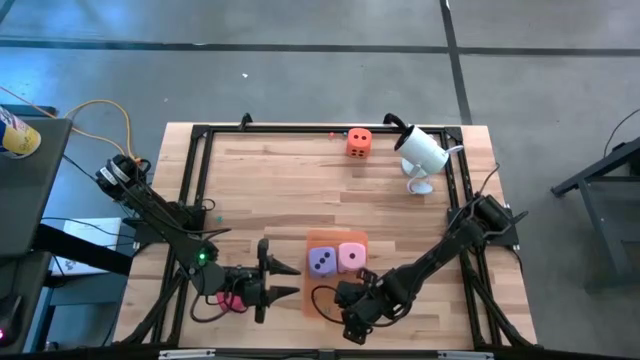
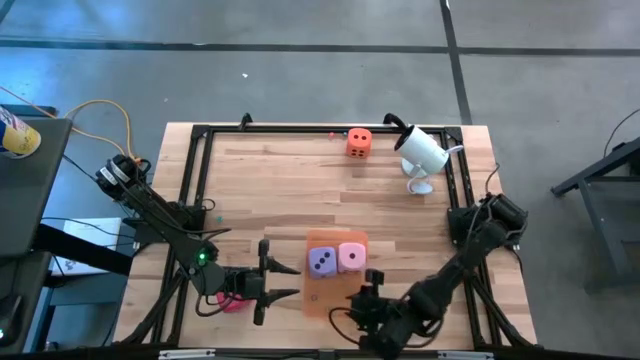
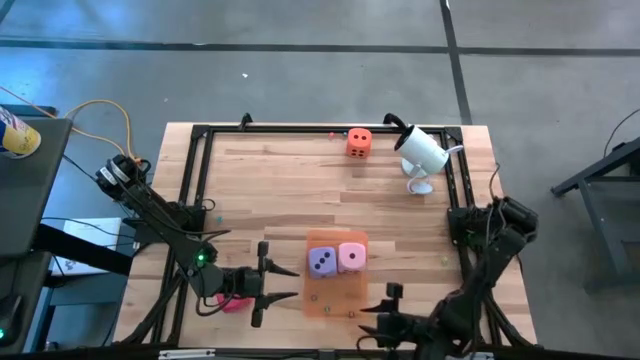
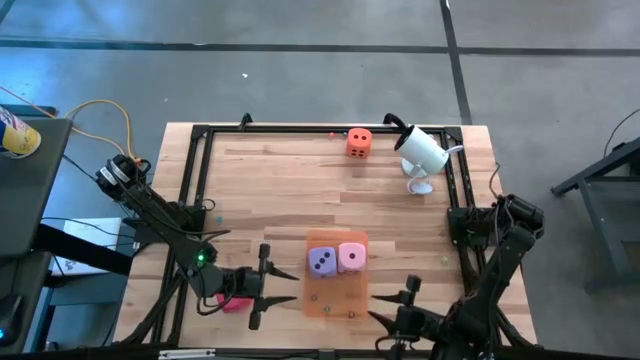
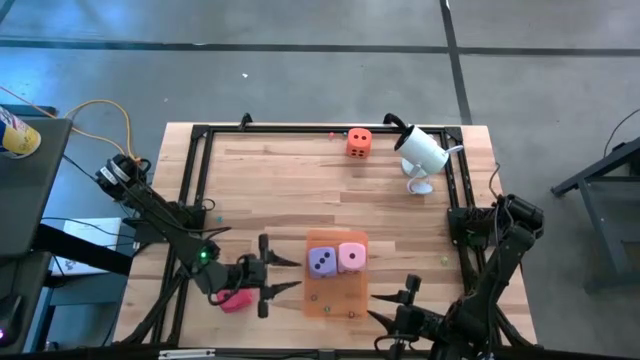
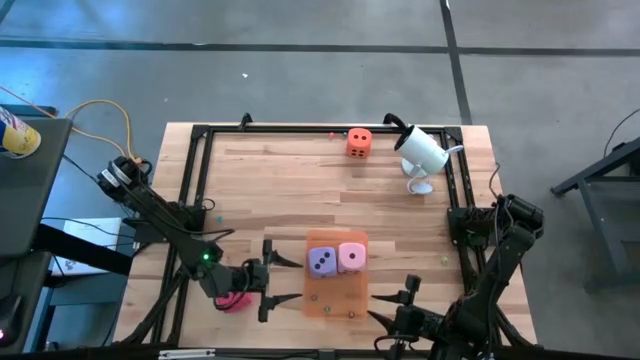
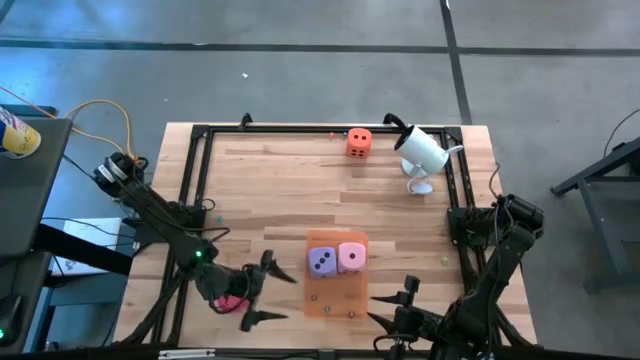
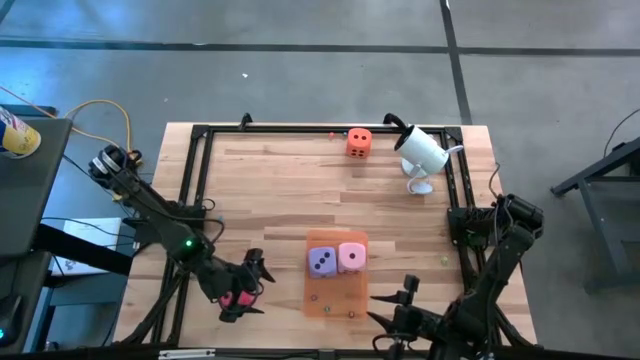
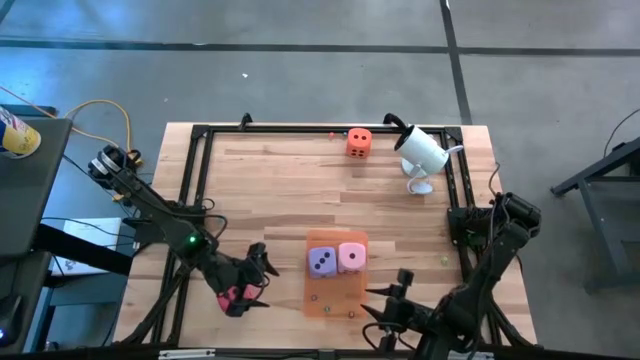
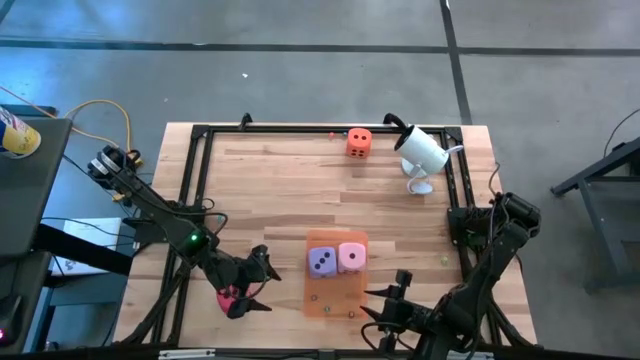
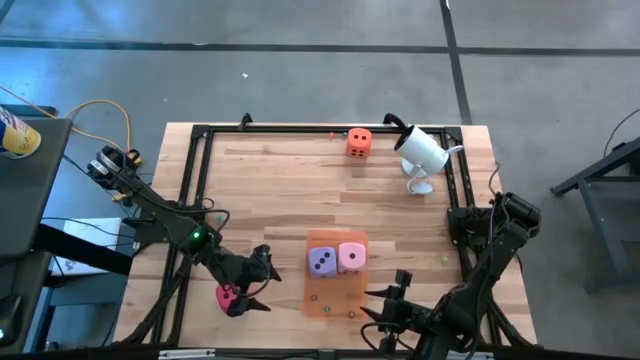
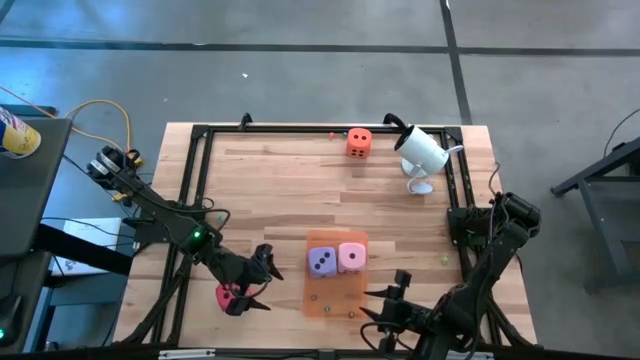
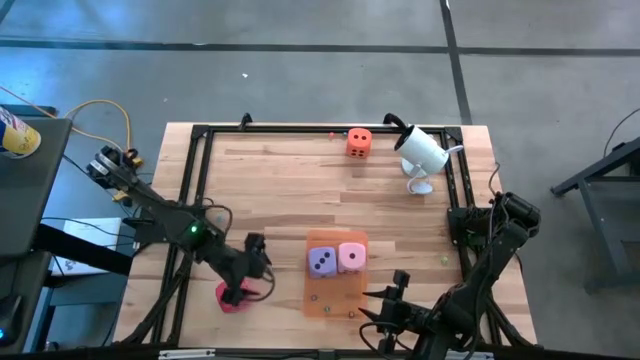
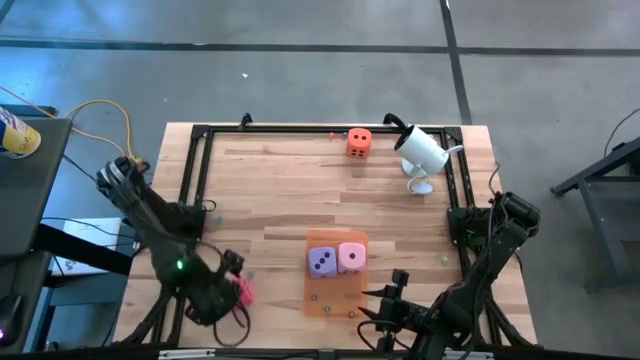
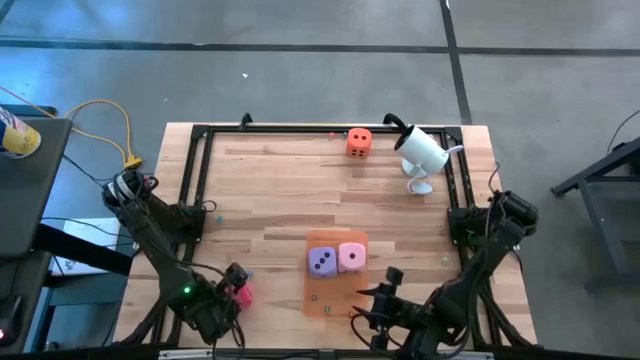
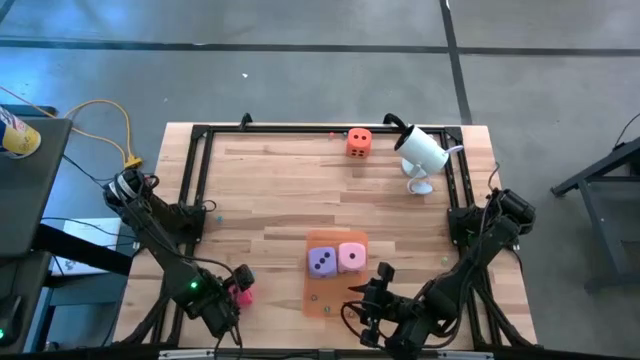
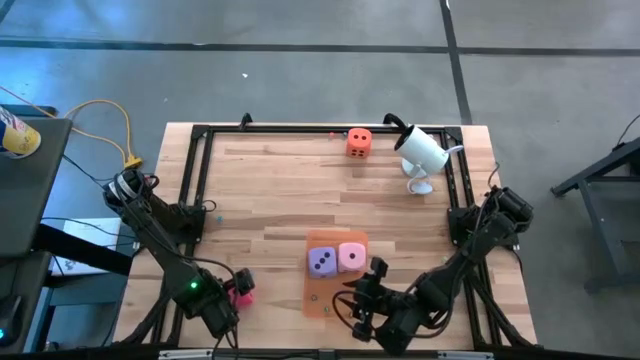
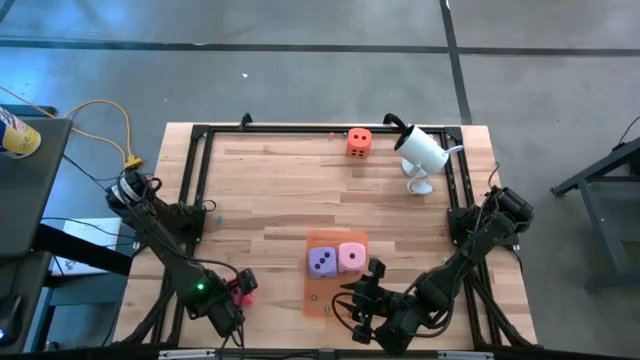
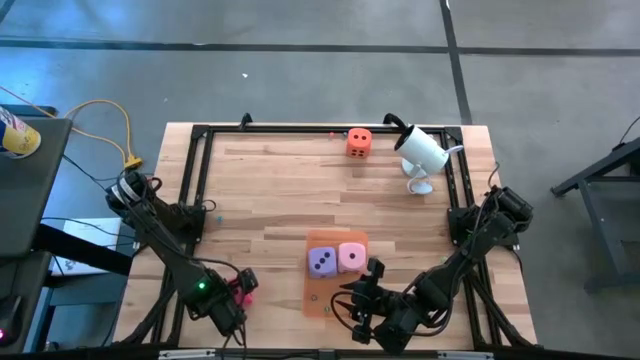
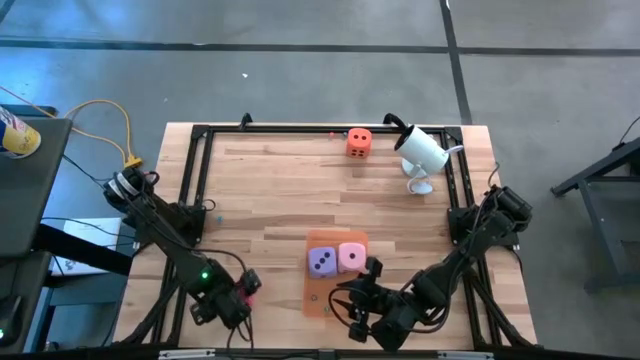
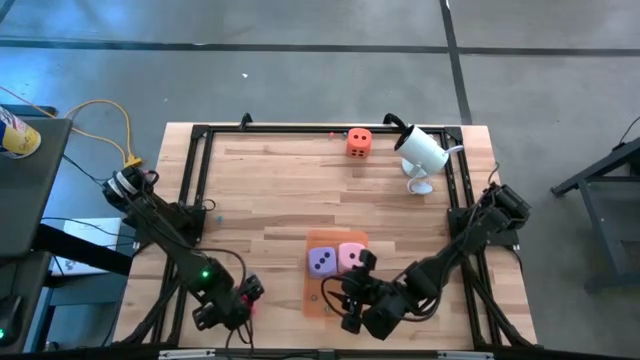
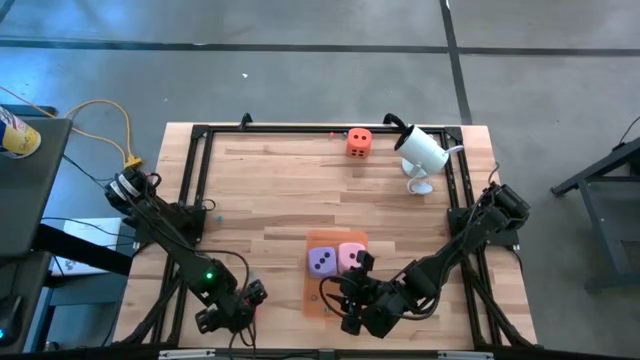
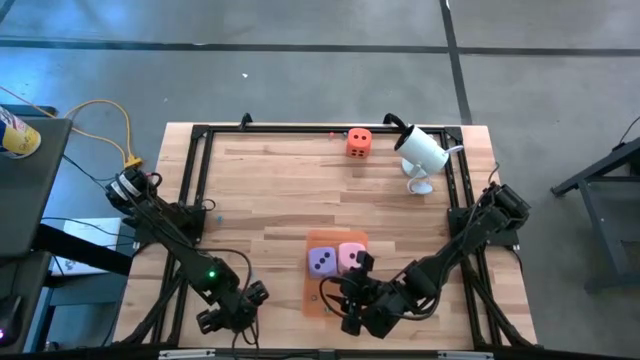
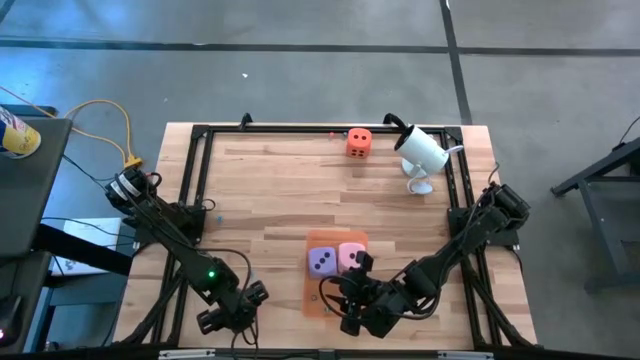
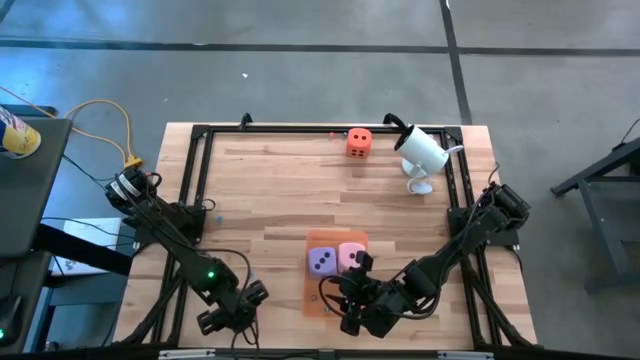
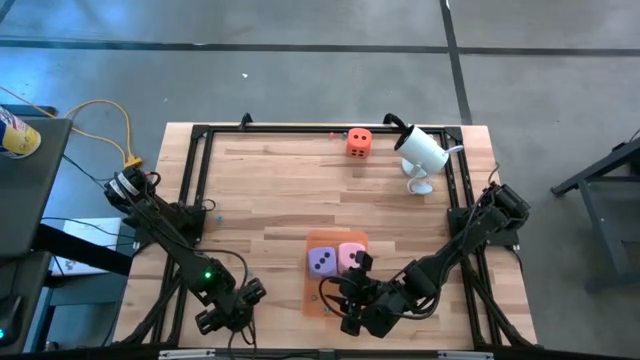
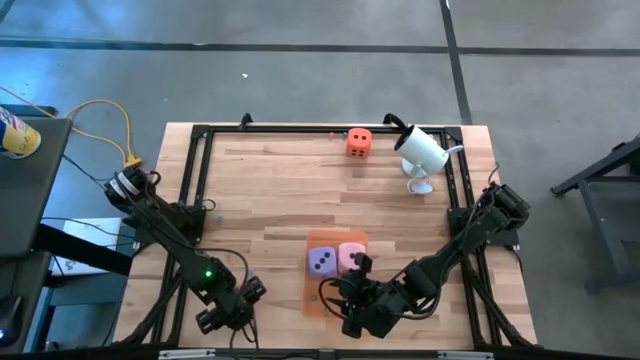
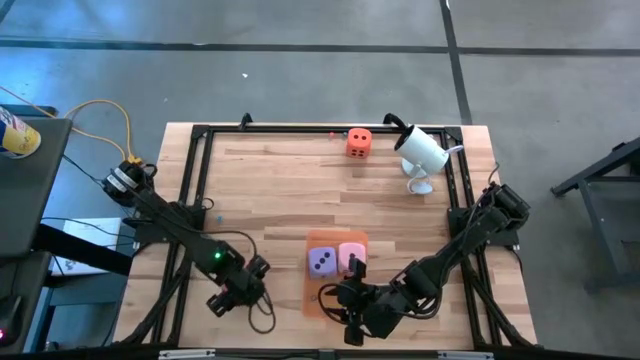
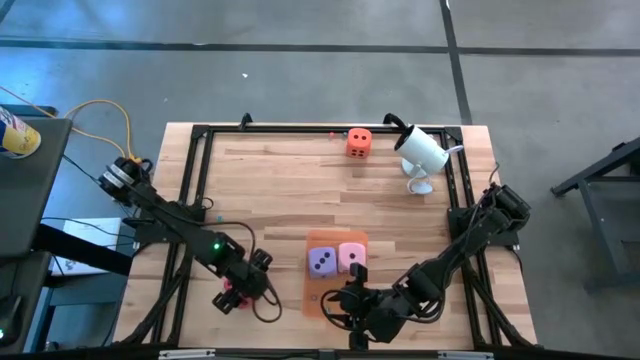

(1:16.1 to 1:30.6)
Task: Pick & Place Dice
Put the large red dice into the orange bin

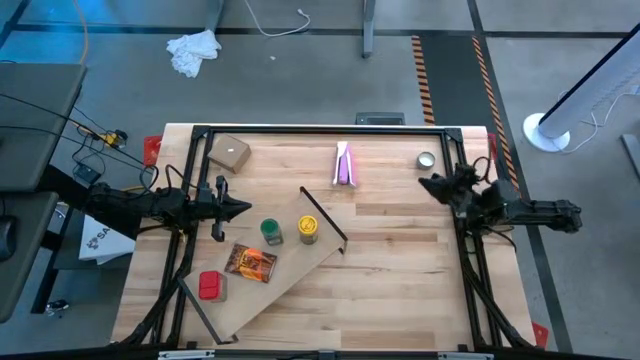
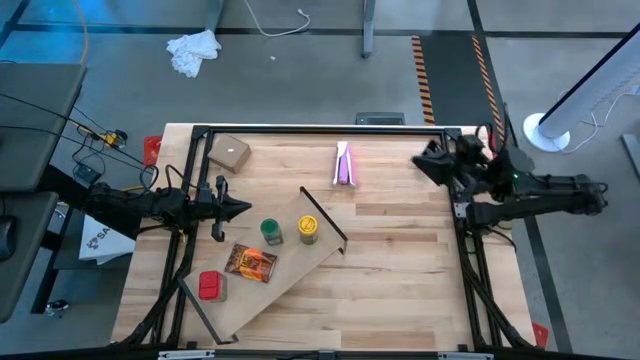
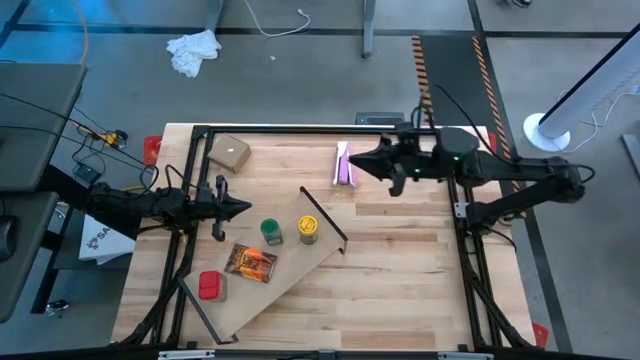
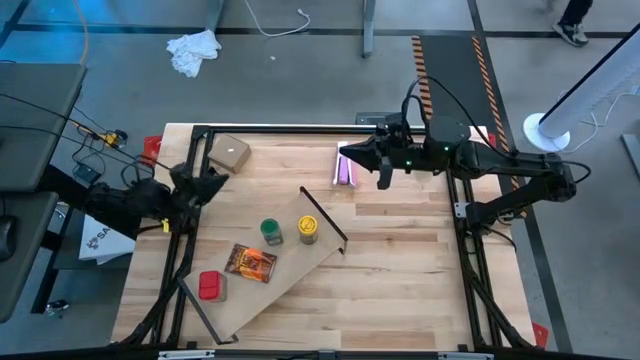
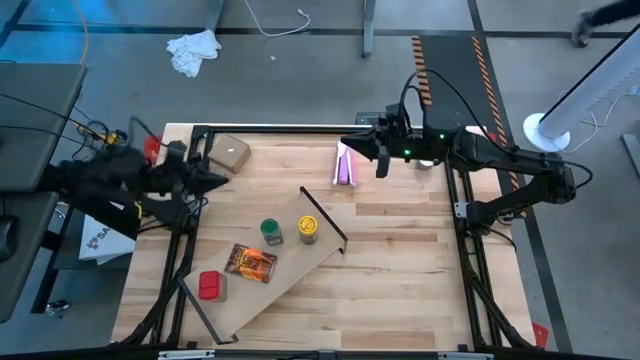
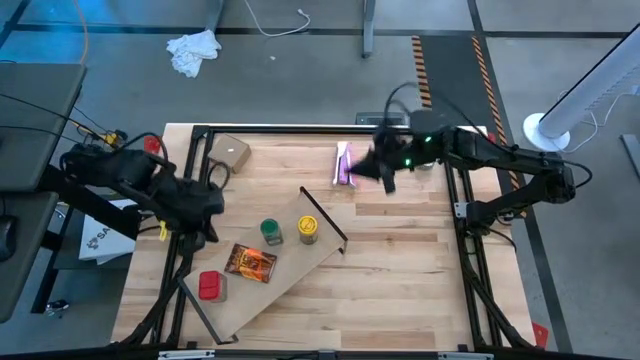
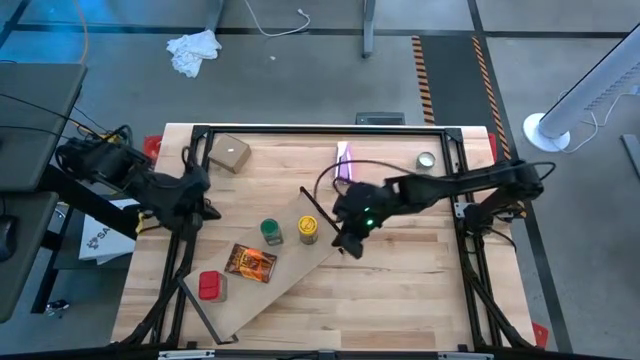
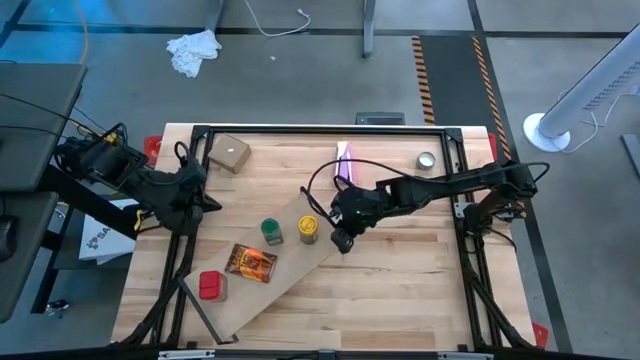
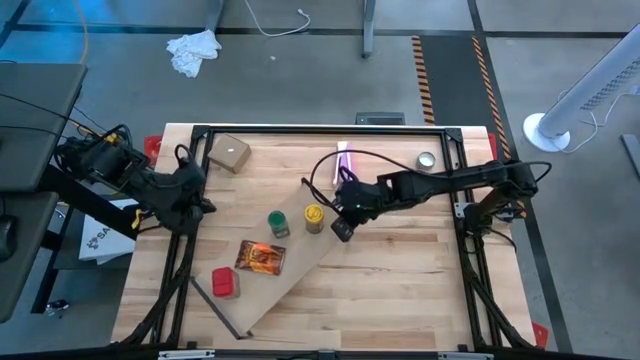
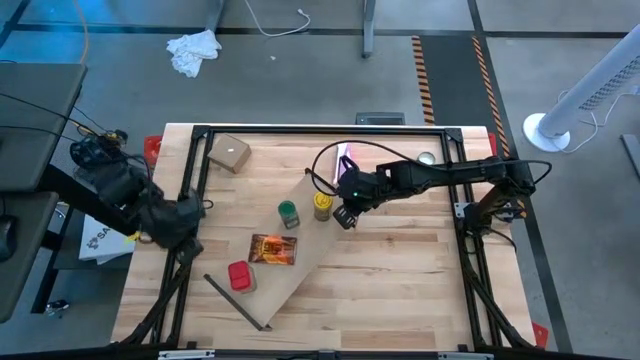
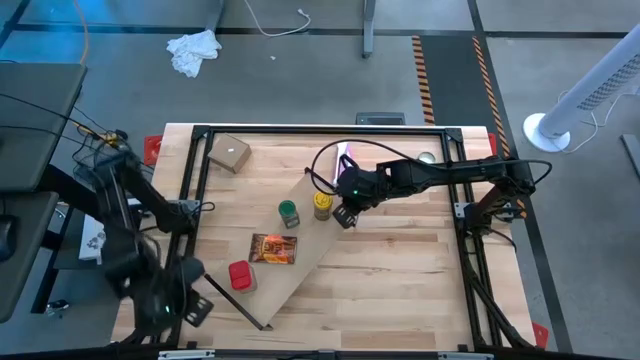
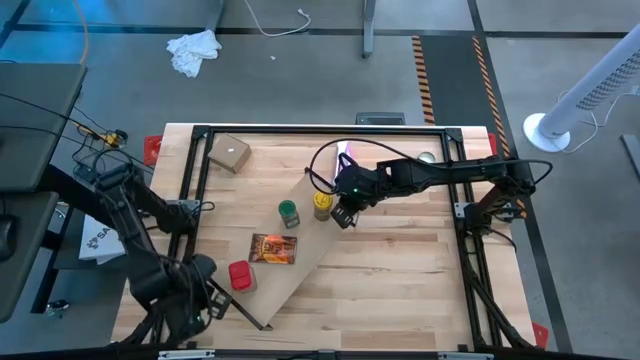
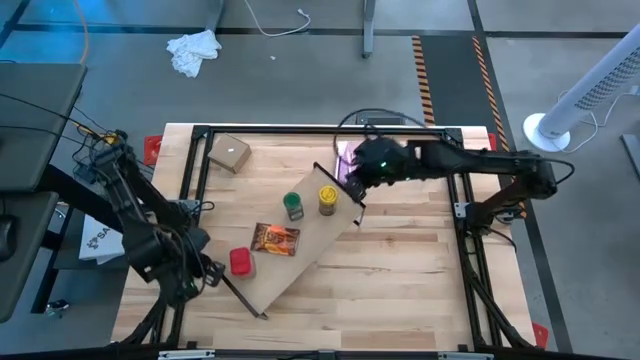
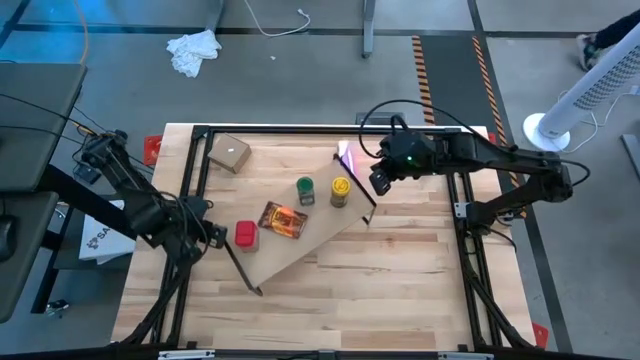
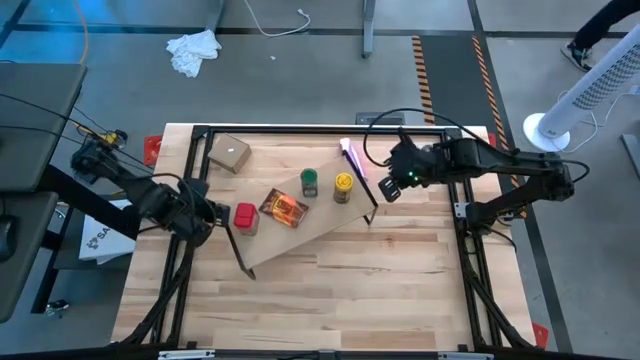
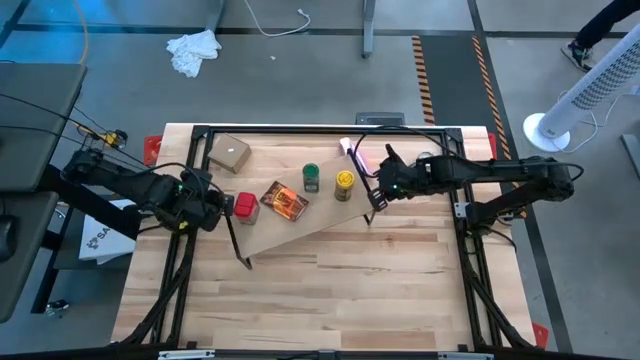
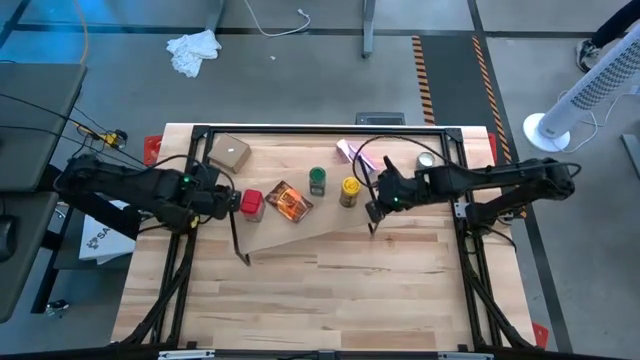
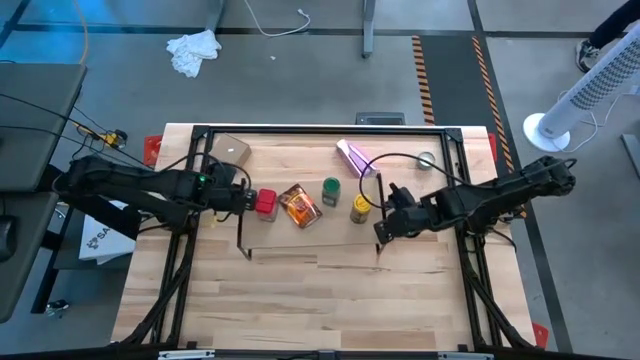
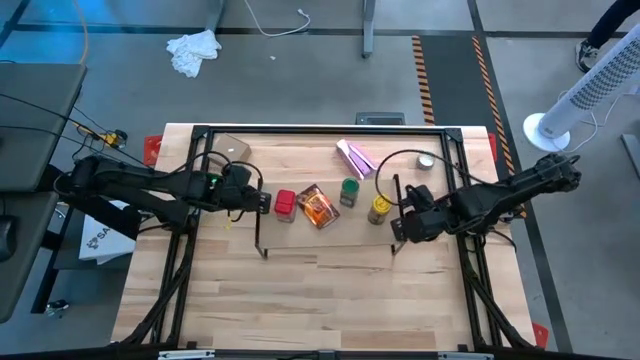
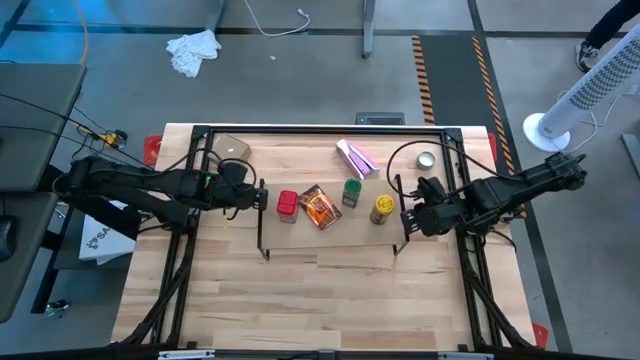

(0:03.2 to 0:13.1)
Task: Shelf spices
Move the shelf to the middle of the table
